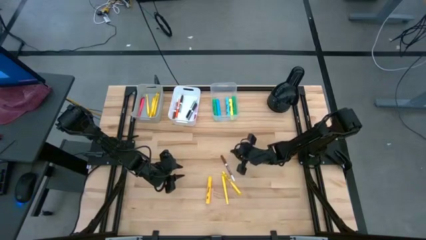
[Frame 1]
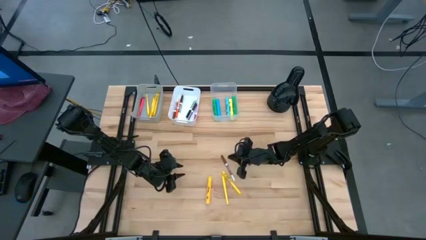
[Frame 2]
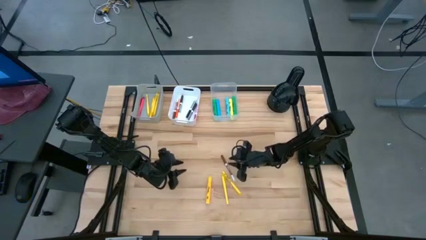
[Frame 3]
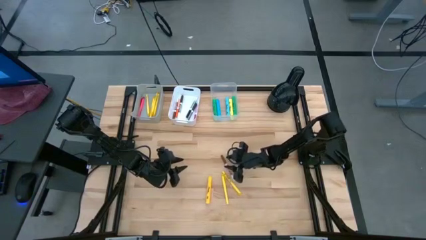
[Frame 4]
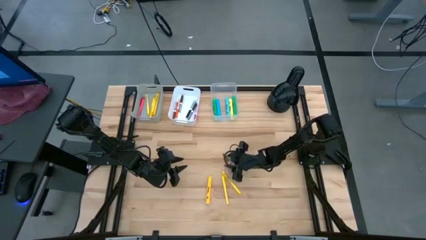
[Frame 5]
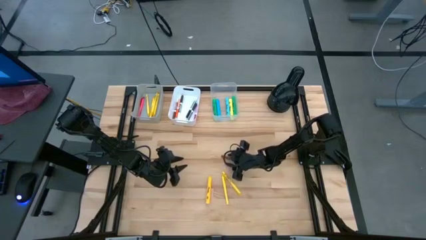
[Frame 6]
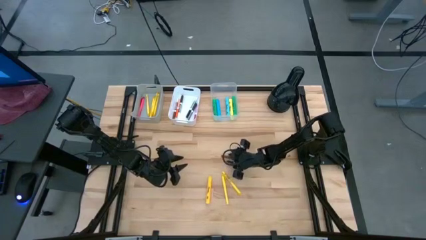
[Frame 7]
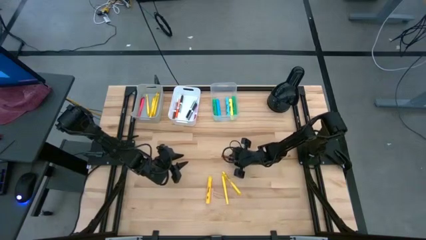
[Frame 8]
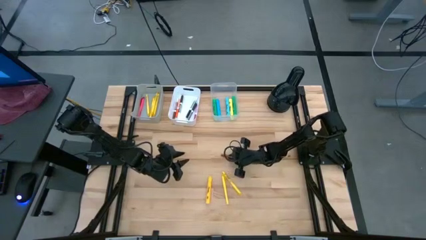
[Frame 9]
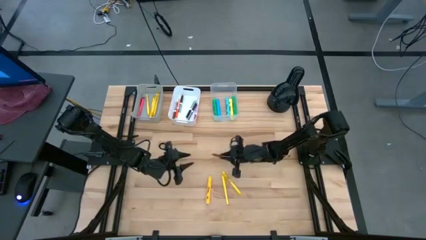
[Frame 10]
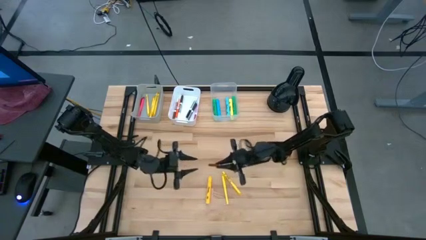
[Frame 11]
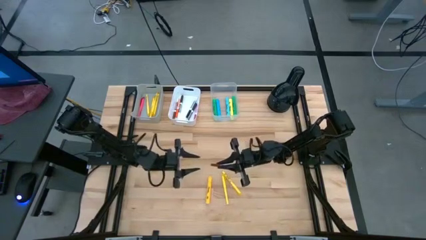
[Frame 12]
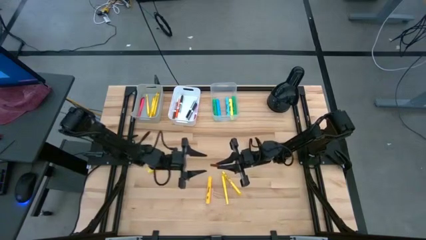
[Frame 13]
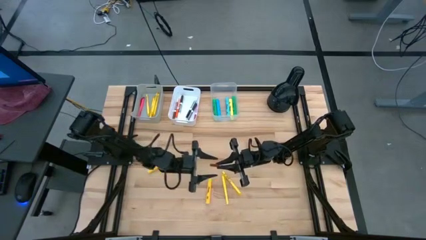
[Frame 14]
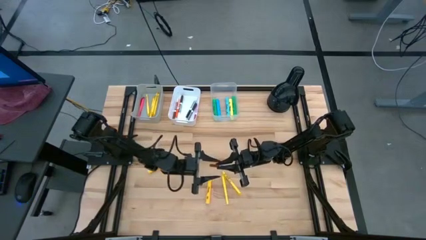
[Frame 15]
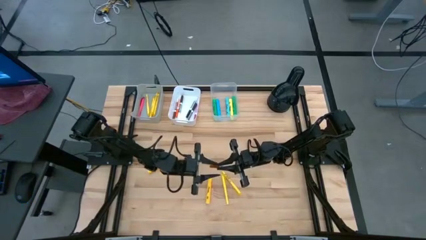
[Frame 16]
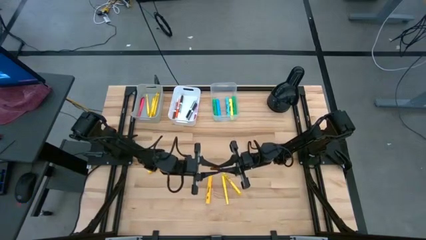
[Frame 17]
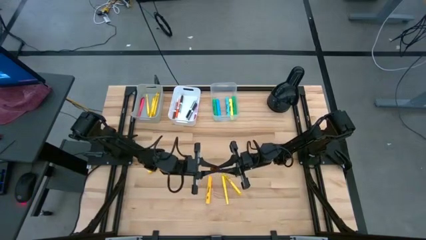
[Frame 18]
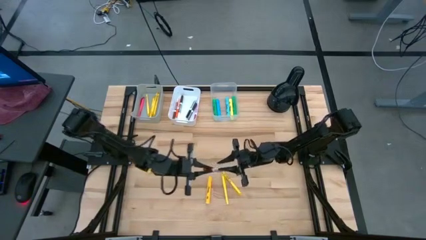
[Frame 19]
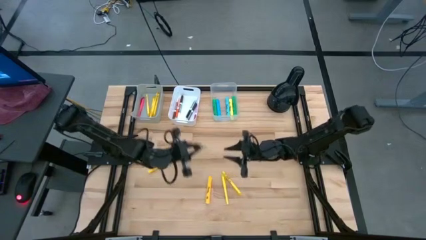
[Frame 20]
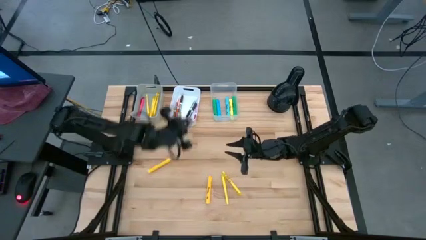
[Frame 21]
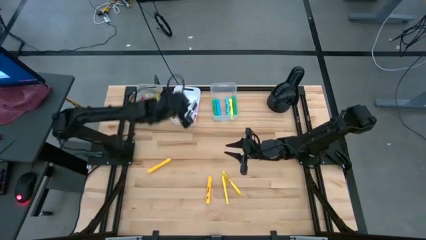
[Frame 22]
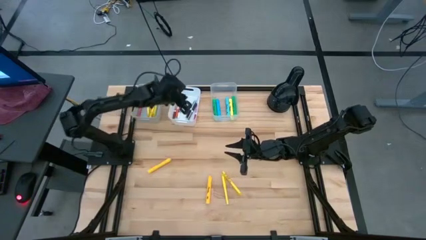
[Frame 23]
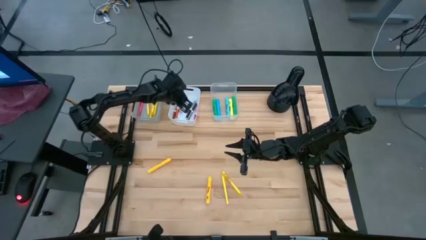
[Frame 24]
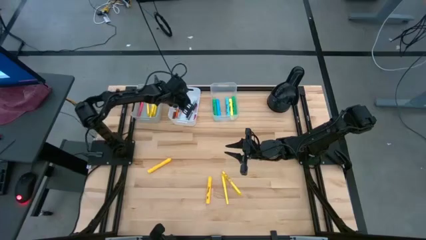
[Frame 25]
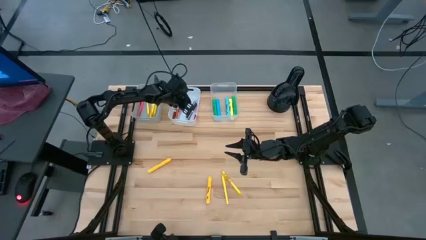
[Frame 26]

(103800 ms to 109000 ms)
Task: Pick & Place Markers
Put the brown erase marker into the white bin

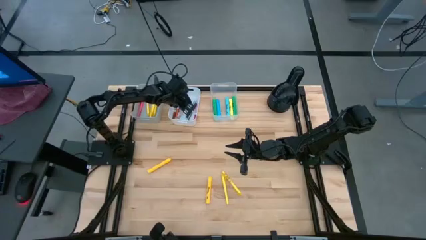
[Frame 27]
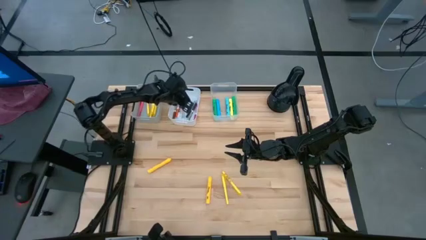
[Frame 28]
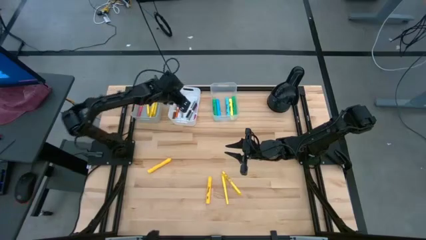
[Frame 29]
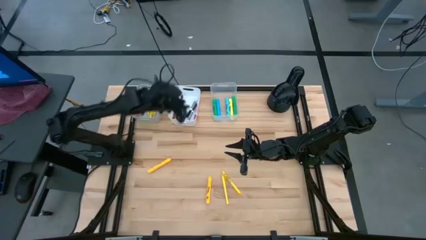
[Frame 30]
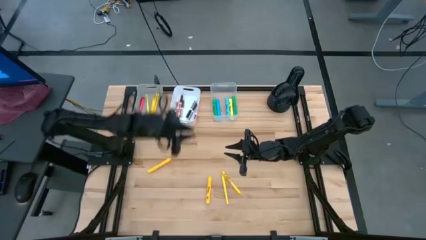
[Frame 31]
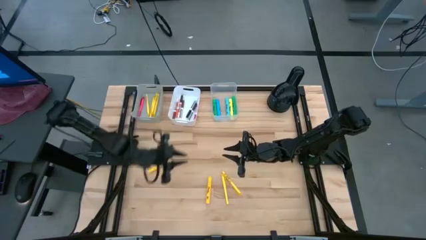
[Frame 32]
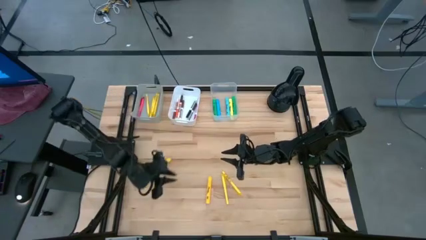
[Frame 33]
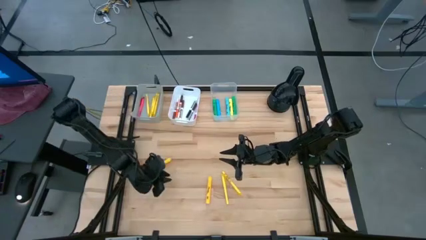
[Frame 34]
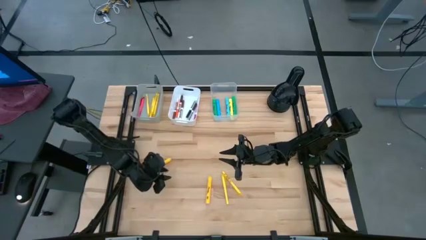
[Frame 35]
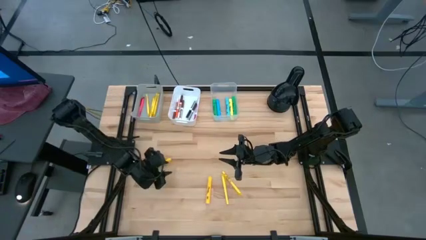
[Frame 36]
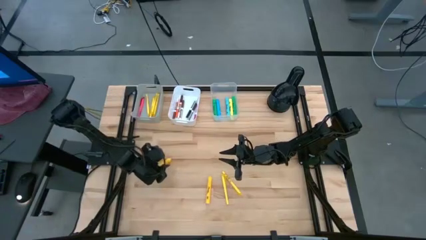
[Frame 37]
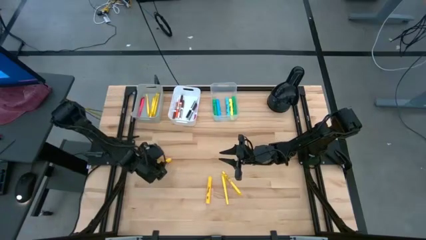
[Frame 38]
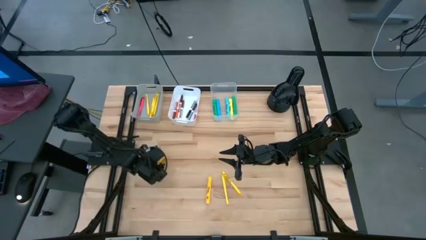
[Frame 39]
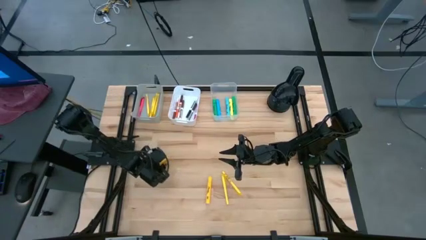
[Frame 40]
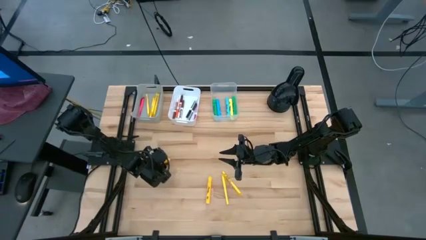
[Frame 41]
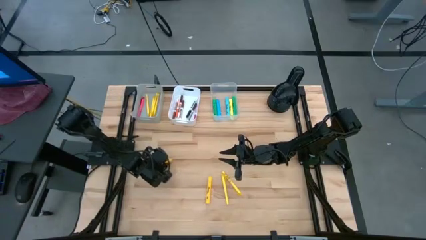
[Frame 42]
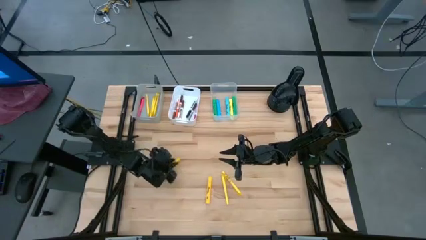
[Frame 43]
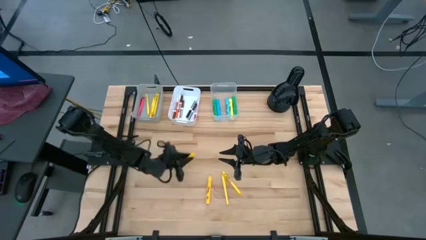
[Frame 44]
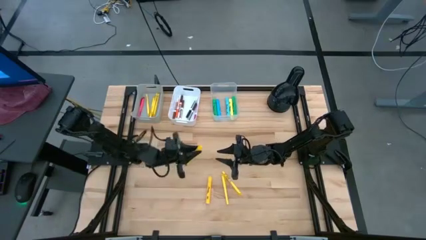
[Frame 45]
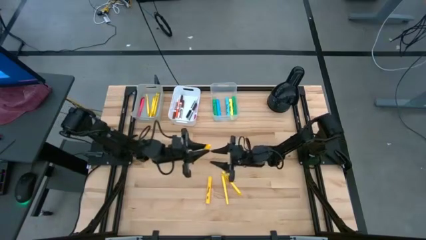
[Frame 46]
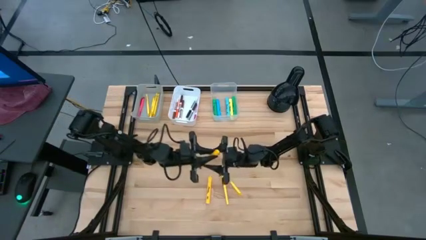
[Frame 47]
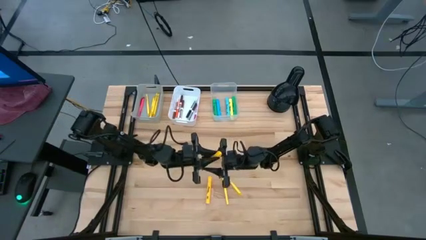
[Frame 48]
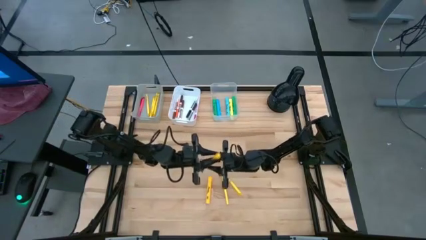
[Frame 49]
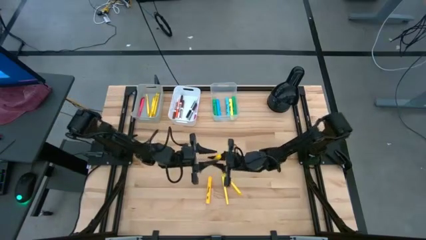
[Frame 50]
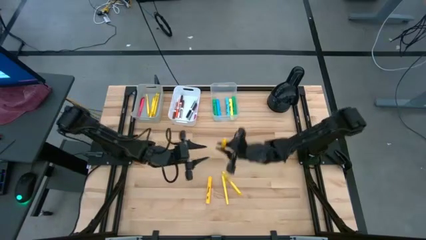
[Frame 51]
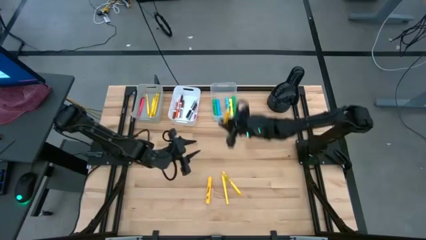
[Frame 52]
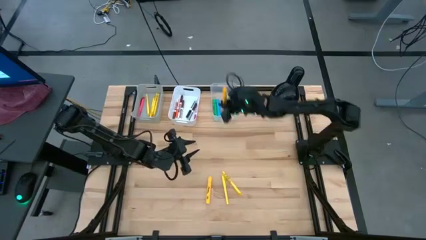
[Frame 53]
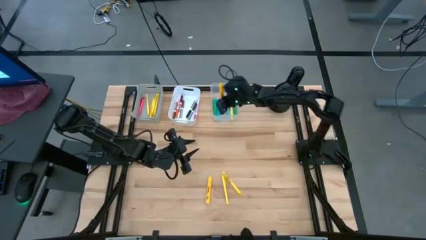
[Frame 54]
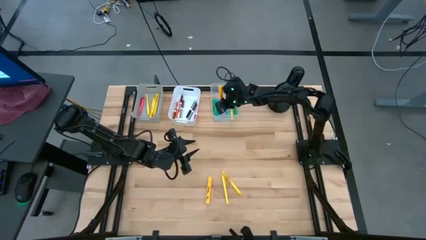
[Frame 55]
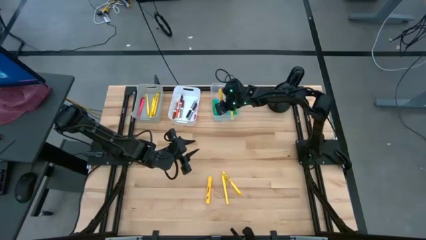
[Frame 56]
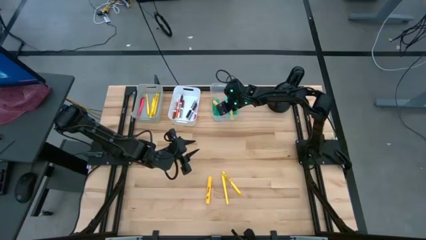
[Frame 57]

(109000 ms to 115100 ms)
Put the yellow highlighter into the transparent bin

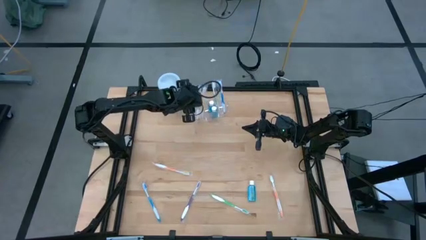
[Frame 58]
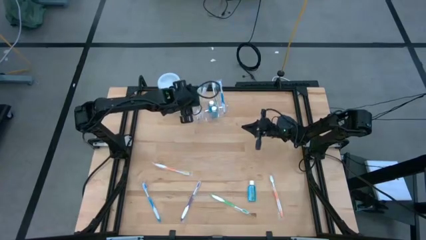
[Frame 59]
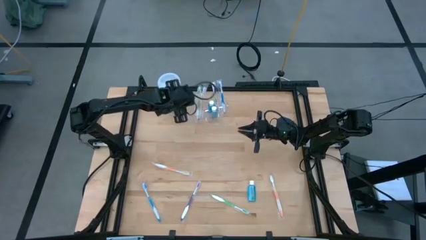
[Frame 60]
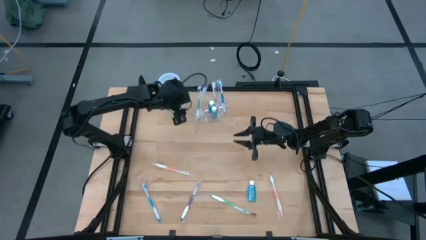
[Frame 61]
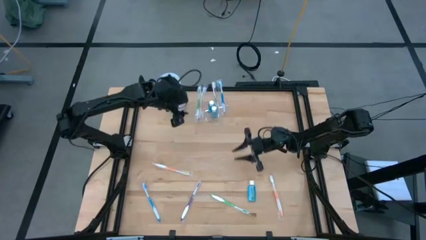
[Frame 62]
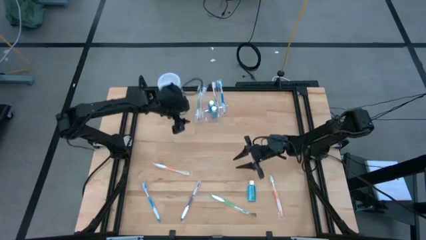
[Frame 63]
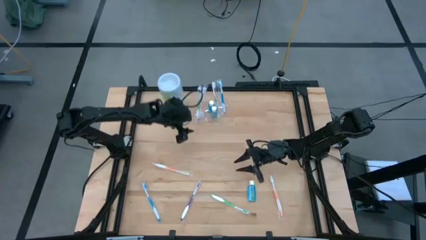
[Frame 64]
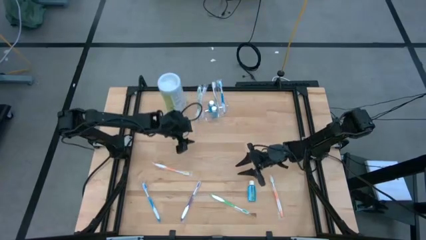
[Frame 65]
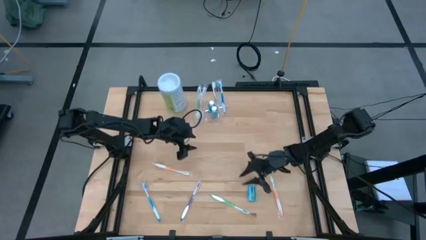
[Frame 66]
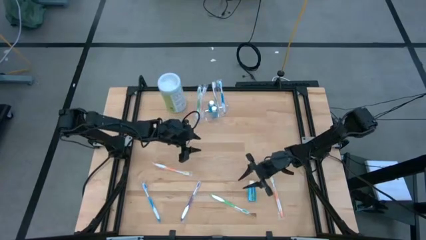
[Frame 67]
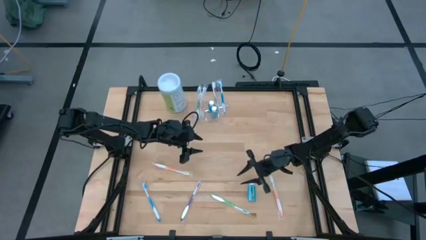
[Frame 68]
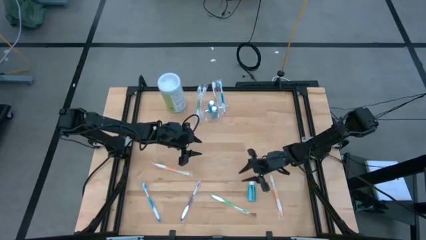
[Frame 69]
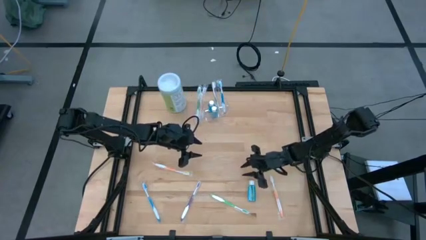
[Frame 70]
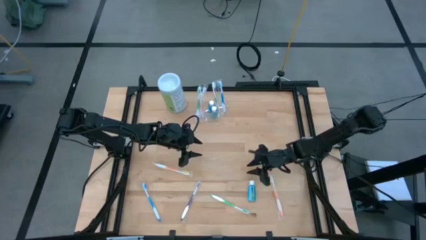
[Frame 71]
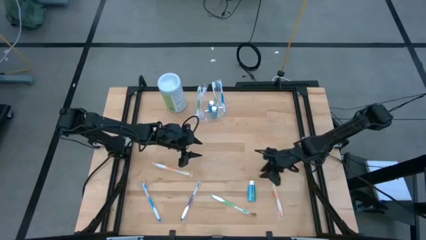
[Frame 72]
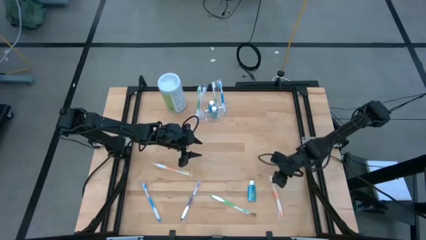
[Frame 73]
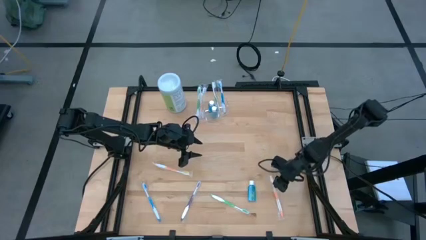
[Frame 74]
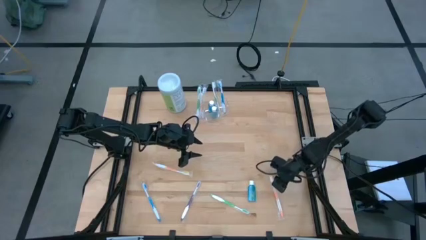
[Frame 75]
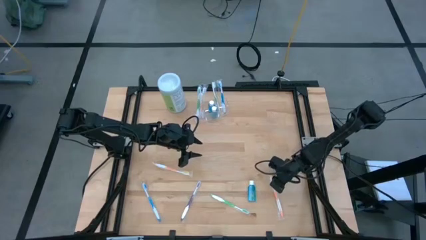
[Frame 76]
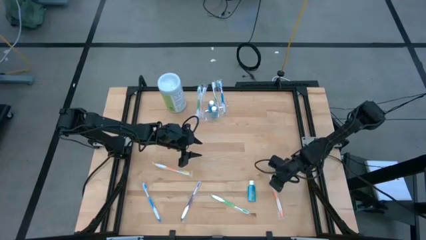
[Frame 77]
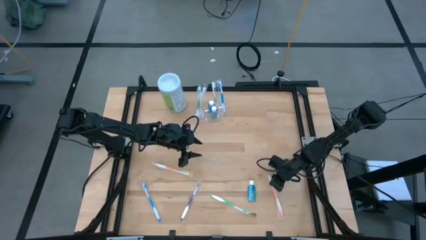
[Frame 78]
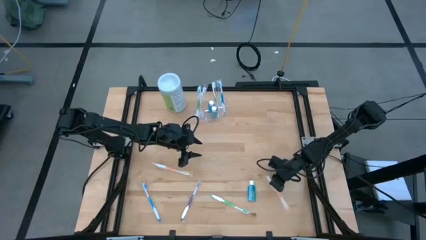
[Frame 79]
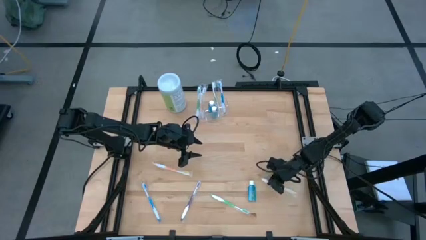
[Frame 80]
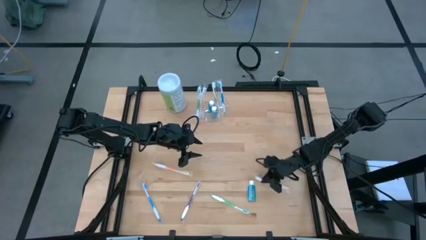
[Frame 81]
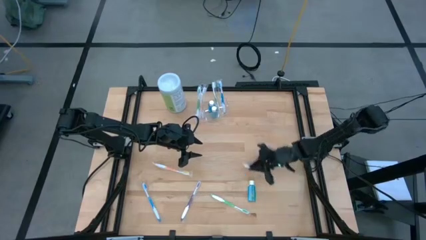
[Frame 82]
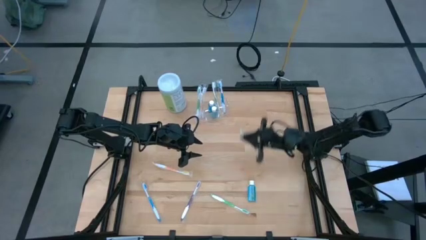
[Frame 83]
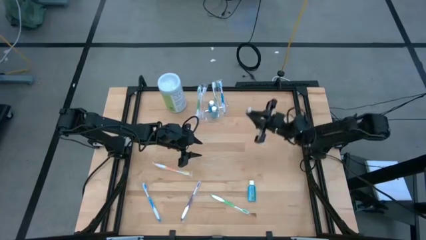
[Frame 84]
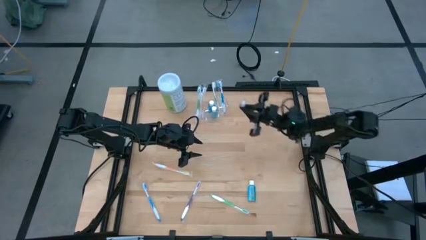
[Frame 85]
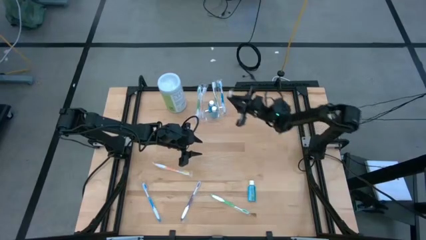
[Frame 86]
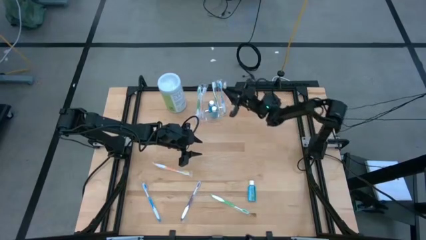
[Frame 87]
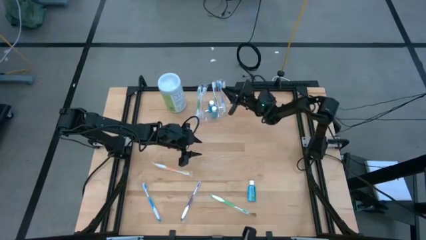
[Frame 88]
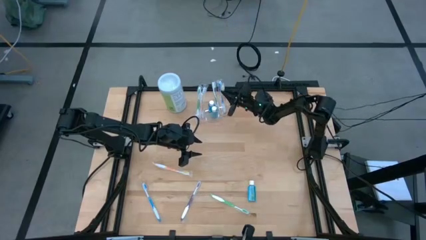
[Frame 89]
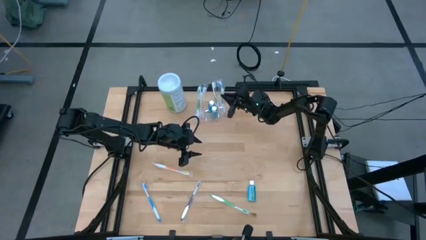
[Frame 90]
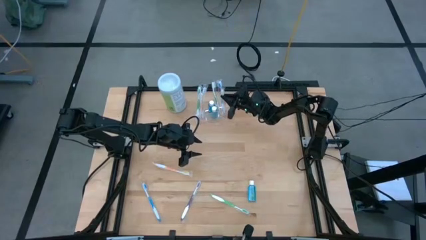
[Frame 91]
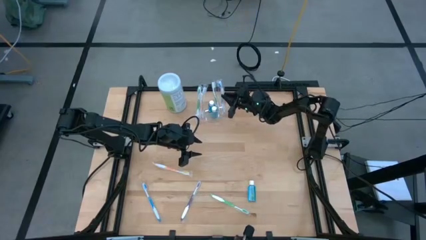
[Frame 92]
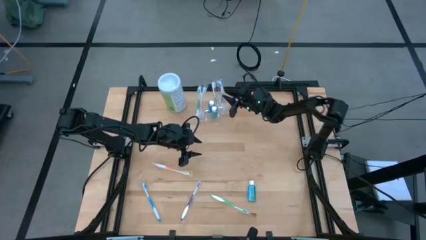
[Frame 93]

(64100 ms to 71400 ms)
Task: Pick & Place toothbrushing station
Put the right orange toothbrush into the transparent organizer
